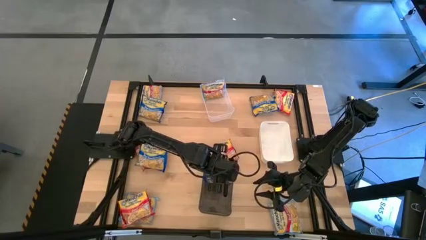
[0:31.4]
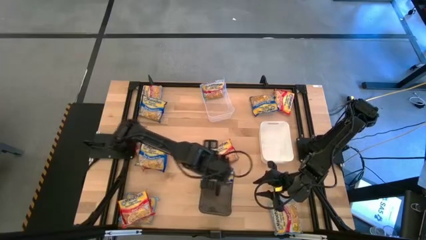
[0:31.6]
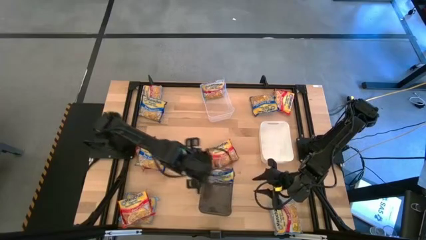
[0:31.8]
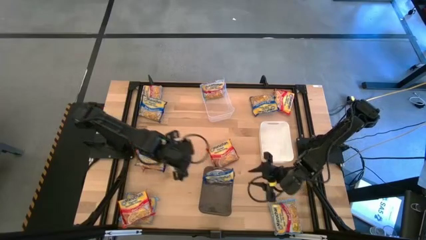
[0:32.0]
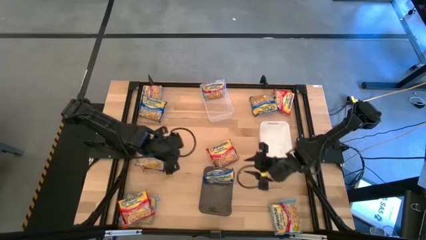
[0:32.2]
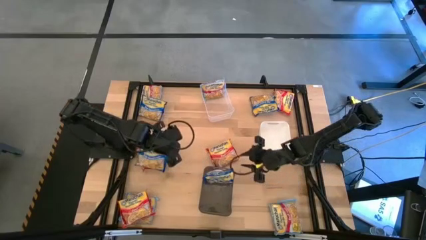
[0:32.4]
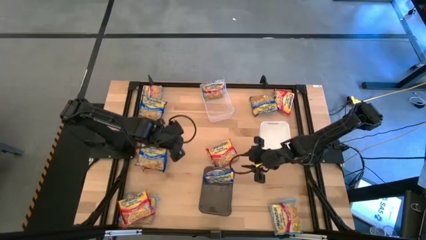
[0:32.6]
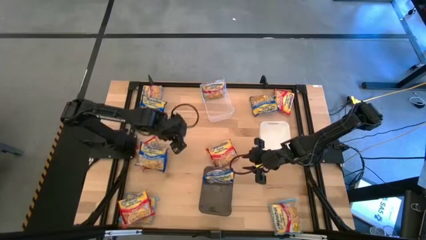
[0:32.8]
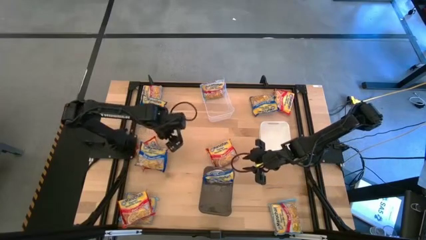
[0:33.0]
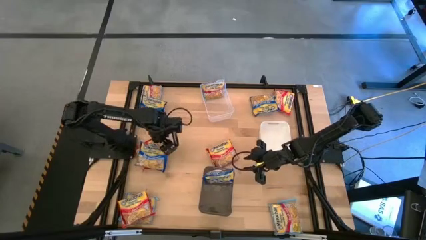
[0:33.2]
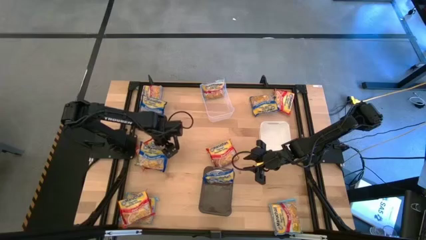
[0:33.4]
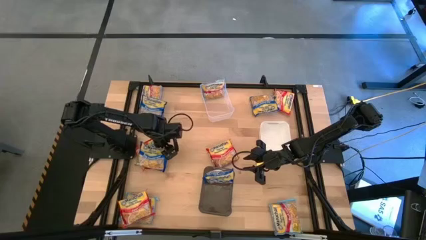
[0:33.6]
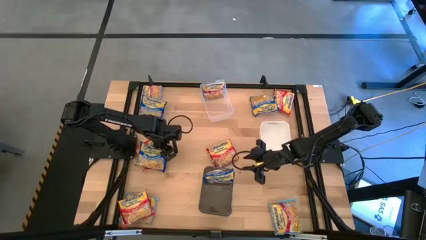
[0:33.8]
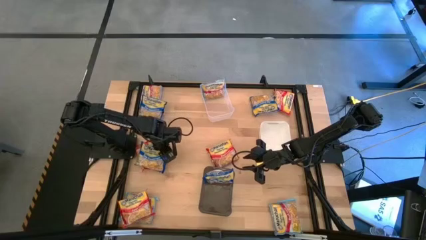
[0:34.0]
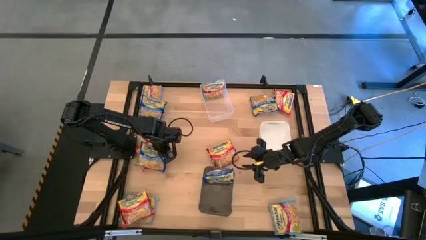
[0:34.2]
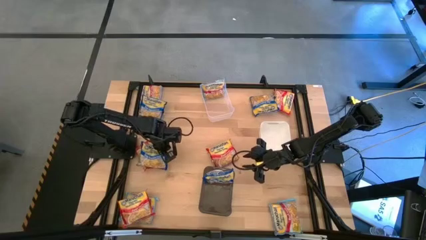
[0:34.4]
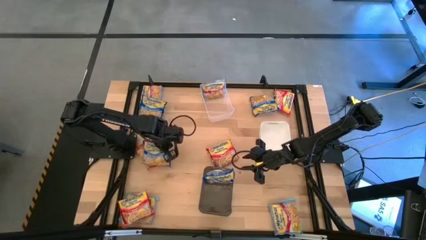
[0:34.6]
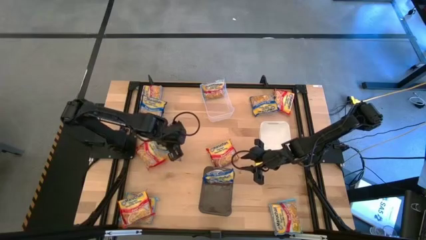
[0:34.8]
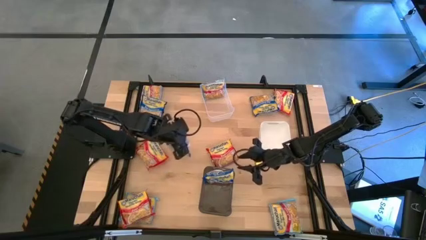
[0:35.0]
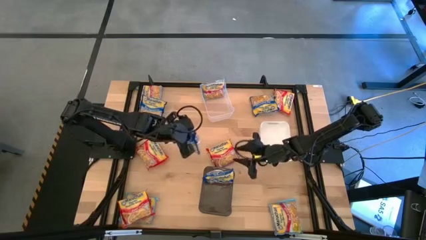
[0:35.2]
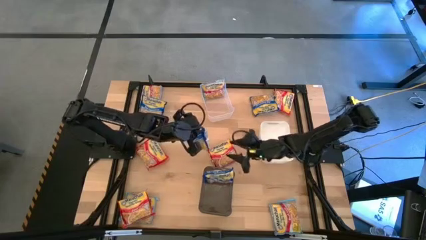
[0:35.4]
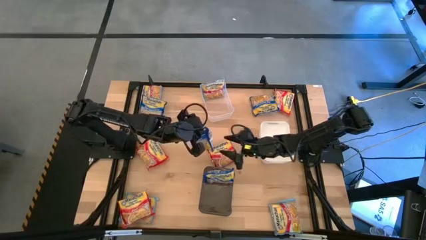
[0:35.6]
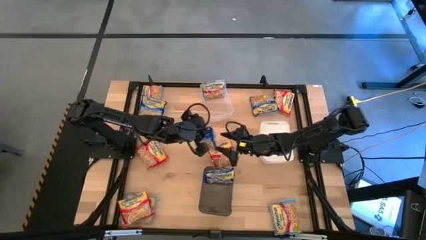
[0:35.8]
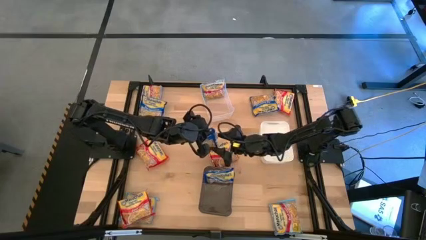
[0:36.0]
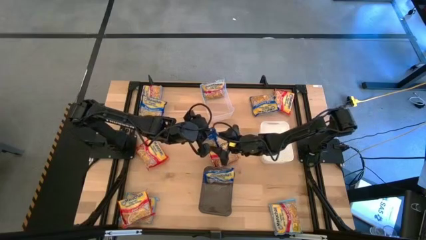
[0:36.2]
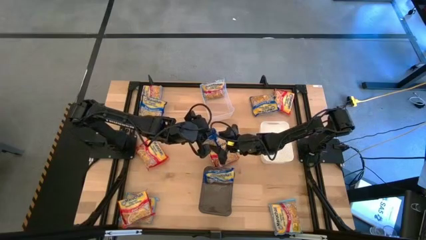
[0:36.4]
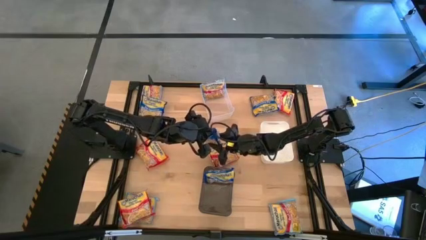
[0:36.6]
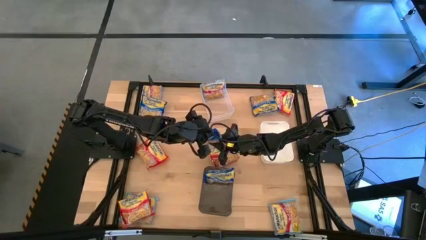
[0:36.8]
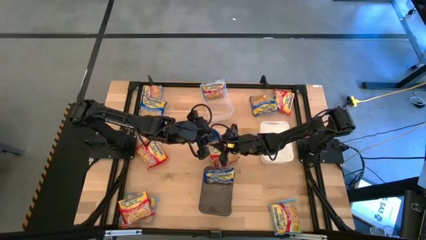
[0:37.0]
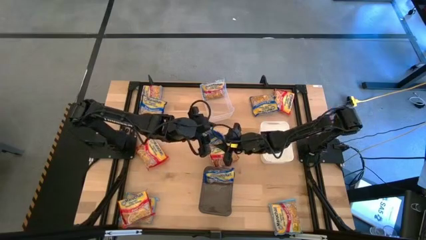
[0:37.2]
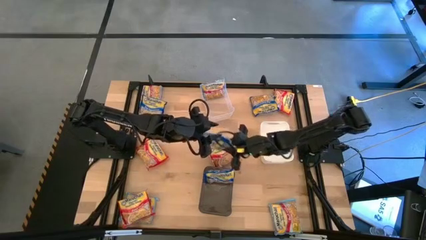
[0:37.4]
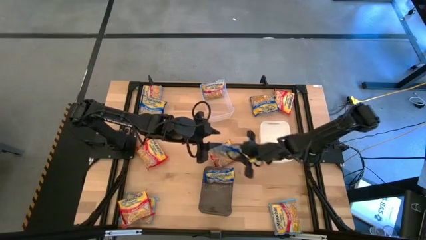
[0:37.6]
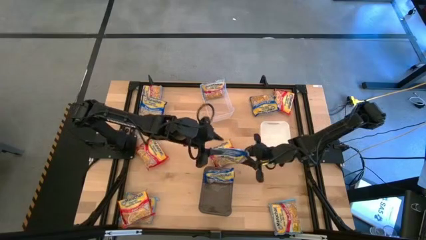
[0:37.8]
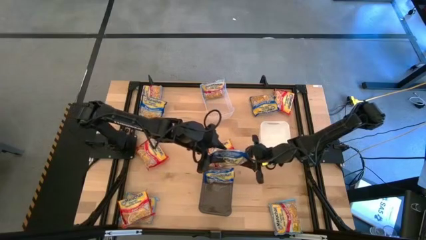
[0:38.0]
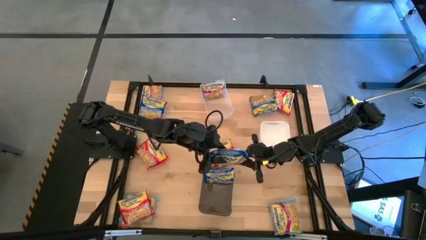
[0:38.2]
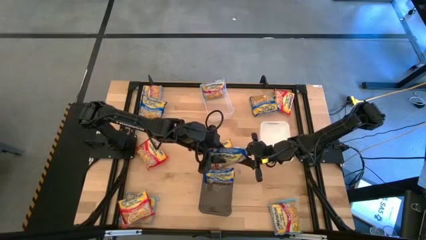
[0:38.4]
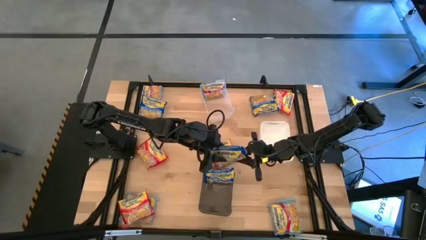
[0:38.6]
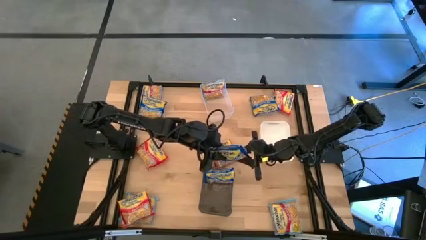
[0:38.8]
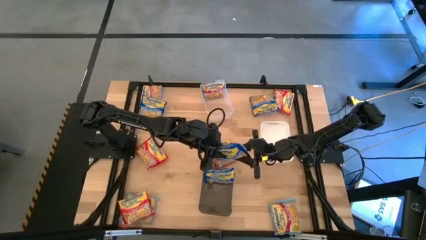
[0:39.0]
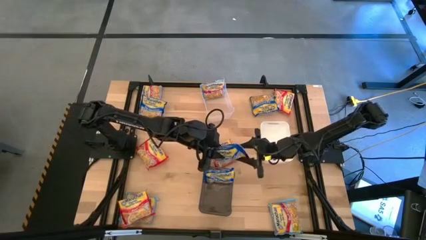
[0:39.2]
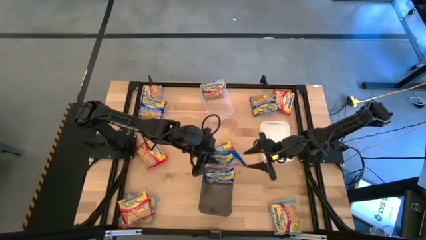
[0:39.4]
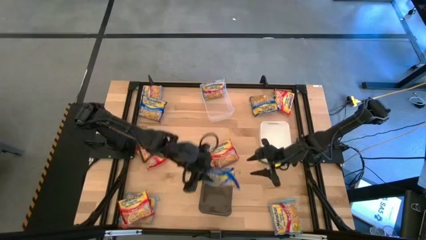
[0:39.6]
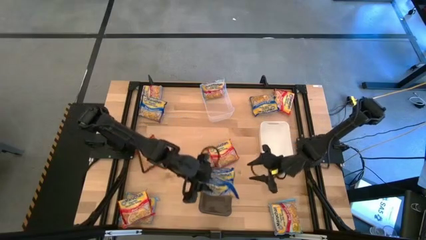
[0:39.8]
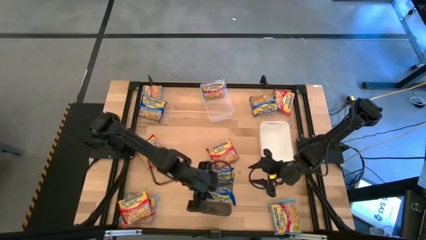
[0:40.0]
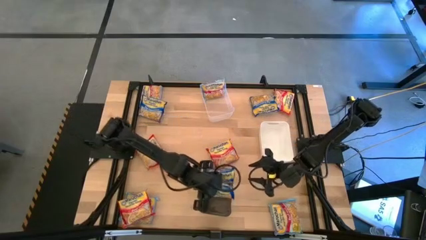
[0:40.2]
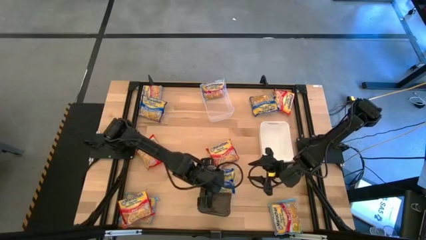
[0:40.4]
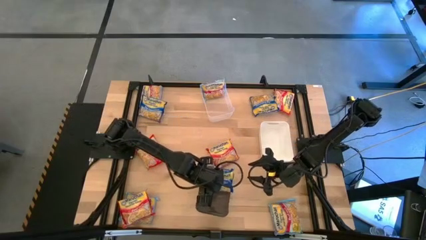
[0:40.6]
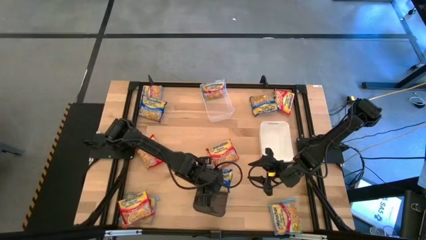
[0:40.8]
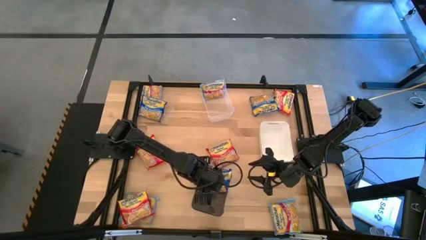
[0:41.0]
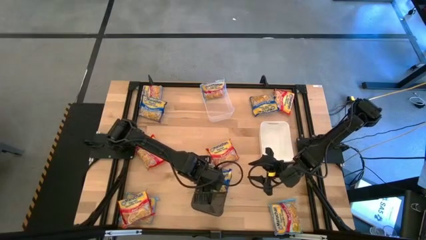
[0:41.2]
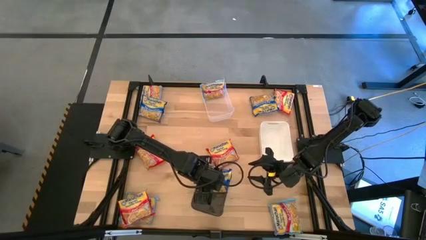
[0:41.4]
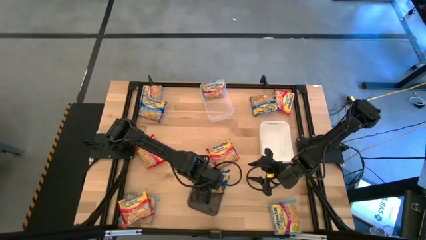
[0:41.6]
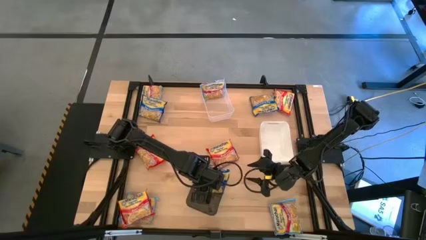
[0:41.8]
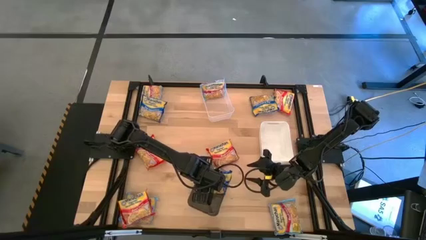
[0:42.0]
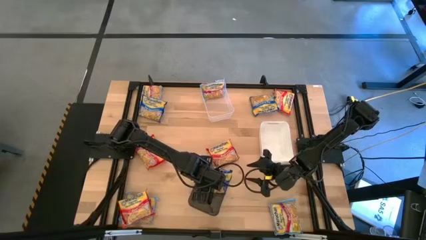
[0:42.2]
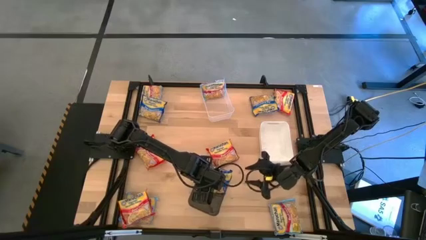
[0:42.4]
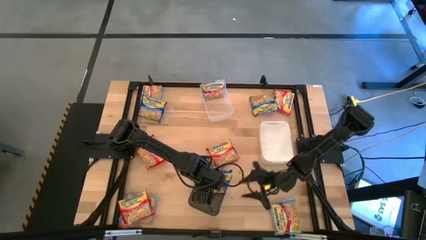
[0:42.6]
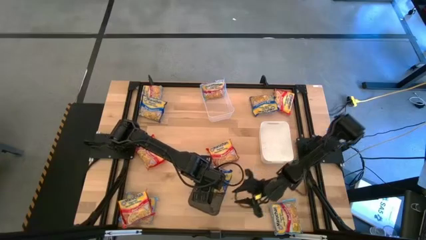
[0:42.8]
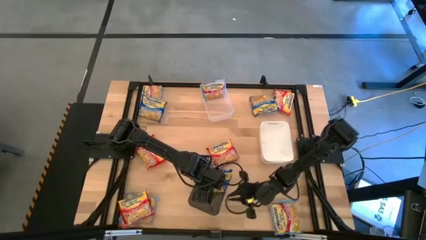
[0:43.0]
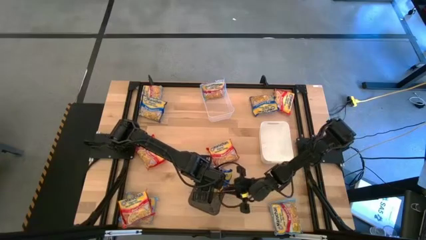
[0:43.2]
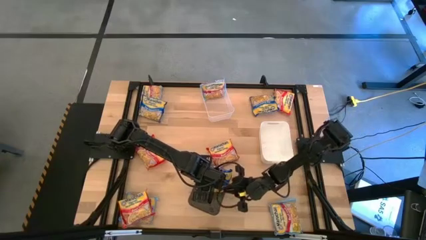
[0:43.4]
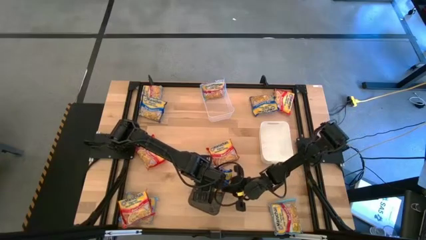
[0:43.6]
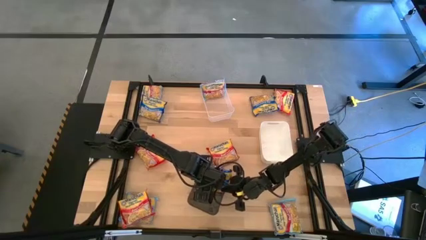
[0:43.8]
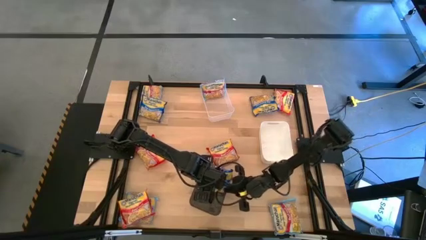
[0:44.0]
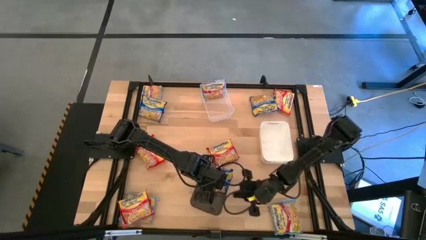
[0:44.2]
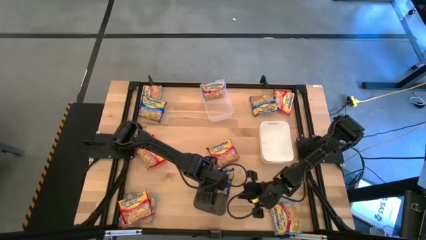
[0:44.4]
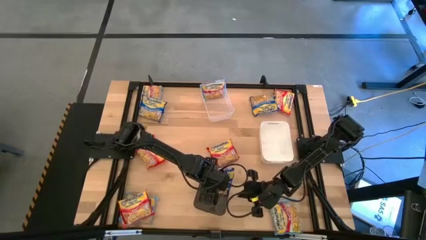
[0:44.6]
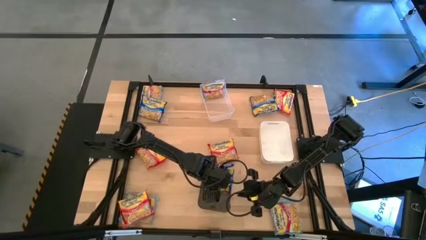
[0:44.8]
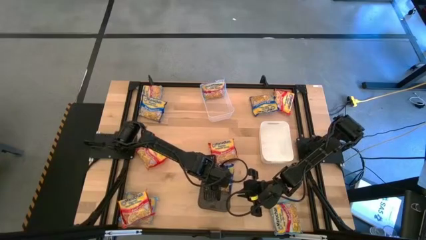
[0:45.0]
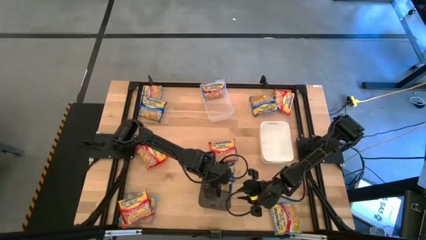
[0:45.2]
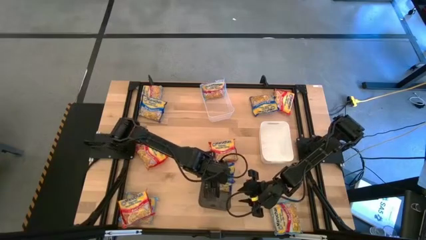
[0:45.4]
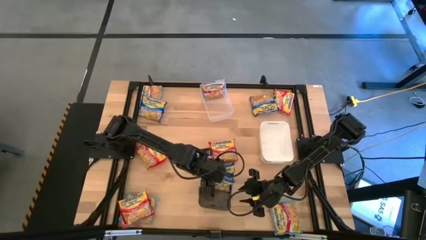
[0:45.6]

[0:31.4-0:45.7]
Task: Sort Maruchan noodles
Put the bottom left blue noodle pack into the black bin
